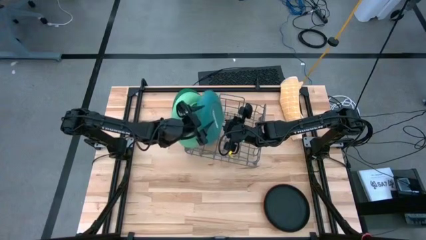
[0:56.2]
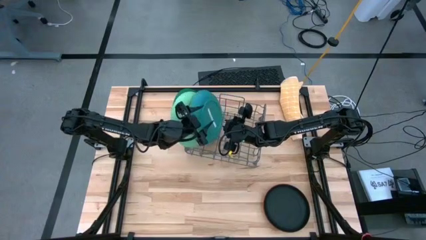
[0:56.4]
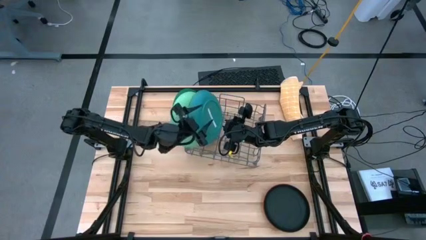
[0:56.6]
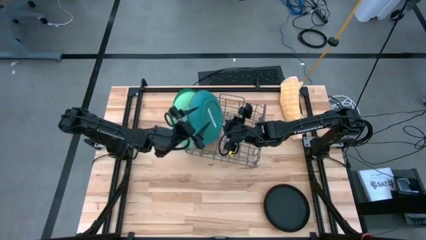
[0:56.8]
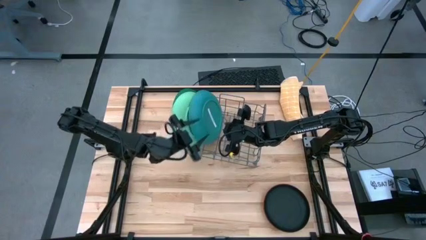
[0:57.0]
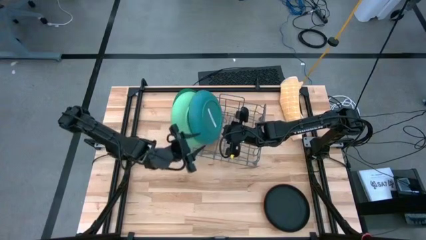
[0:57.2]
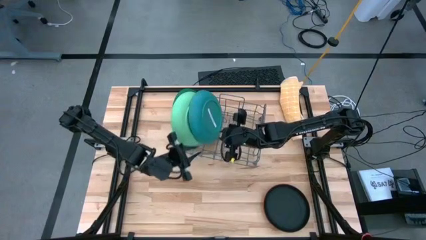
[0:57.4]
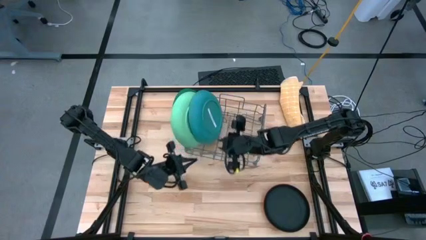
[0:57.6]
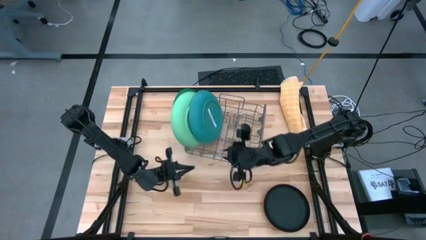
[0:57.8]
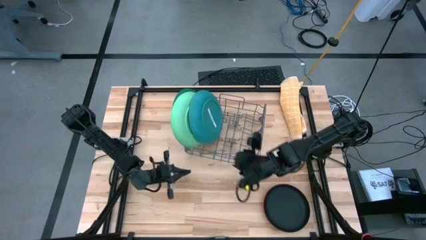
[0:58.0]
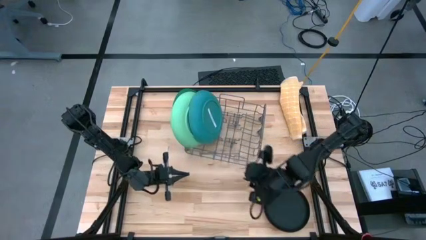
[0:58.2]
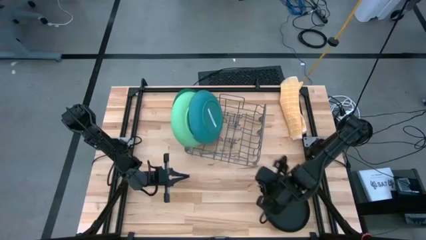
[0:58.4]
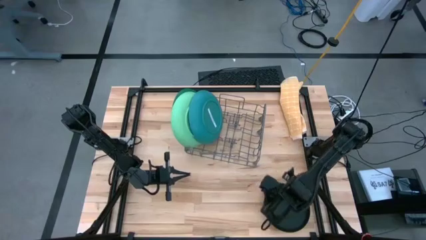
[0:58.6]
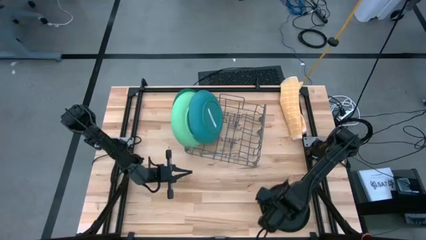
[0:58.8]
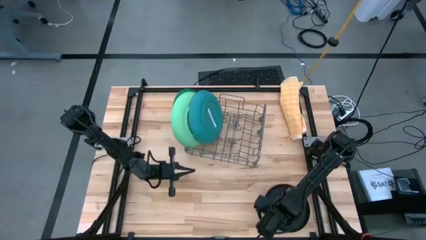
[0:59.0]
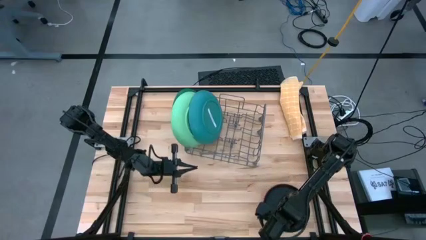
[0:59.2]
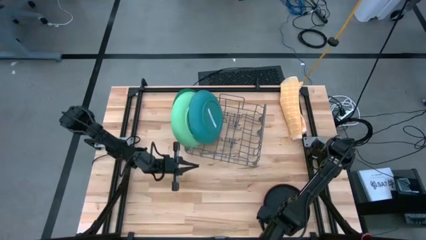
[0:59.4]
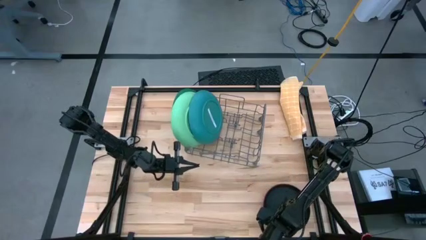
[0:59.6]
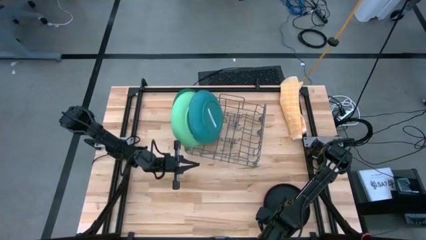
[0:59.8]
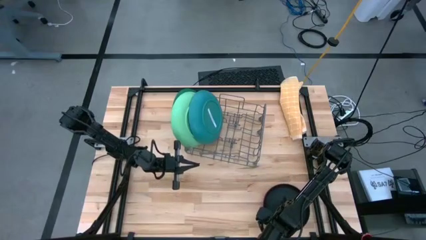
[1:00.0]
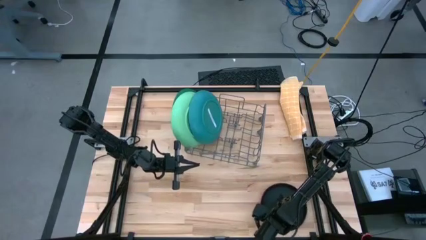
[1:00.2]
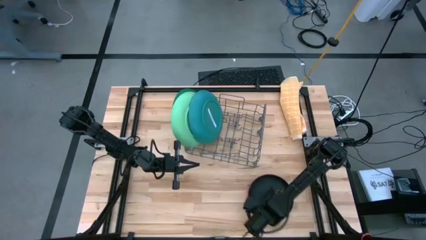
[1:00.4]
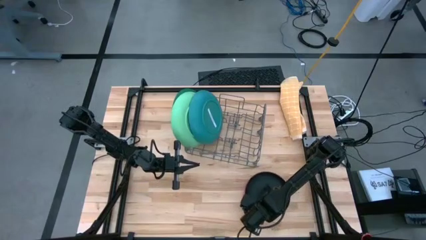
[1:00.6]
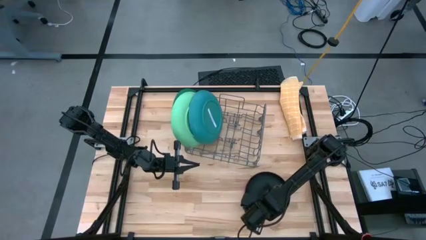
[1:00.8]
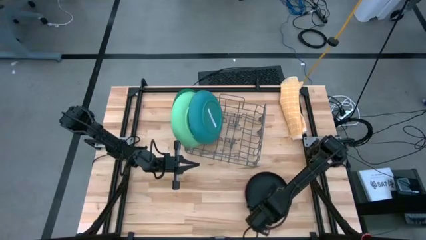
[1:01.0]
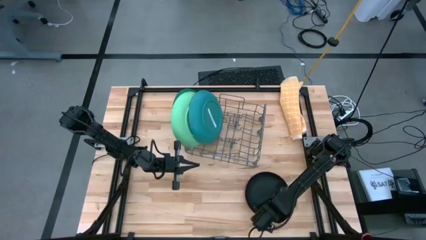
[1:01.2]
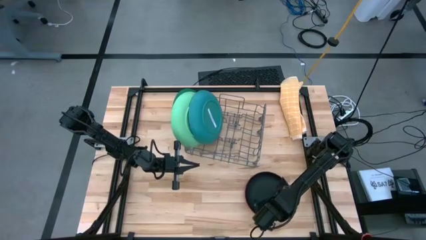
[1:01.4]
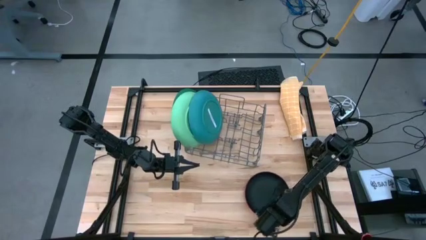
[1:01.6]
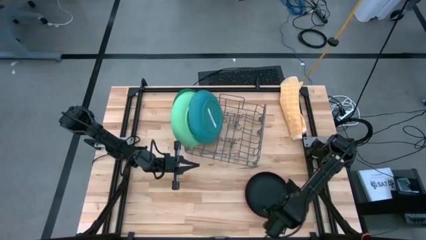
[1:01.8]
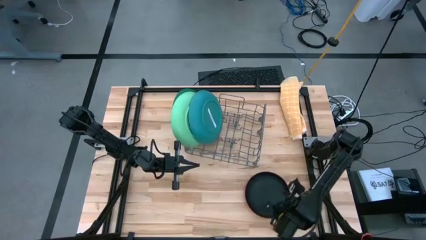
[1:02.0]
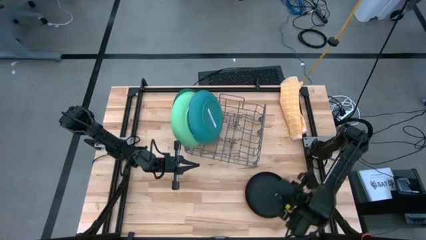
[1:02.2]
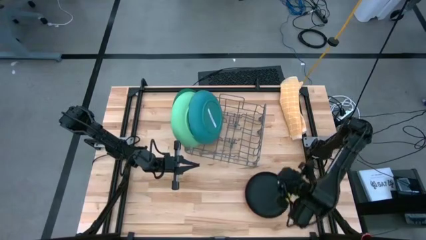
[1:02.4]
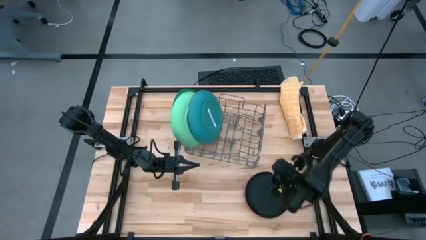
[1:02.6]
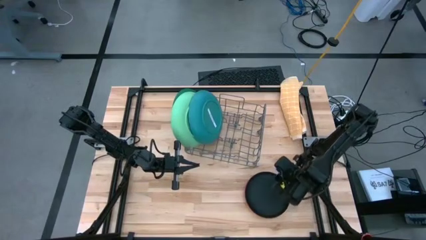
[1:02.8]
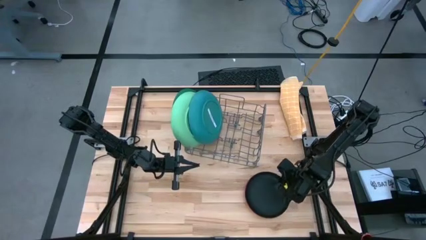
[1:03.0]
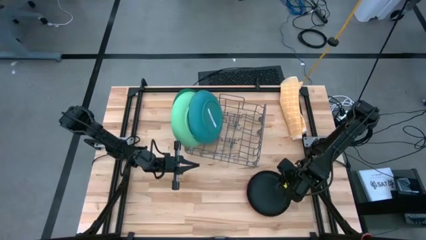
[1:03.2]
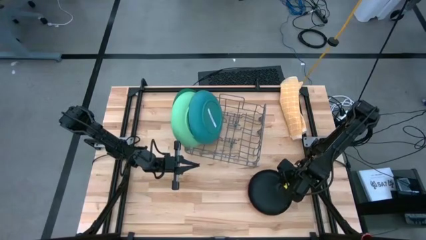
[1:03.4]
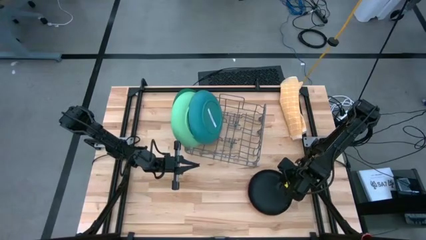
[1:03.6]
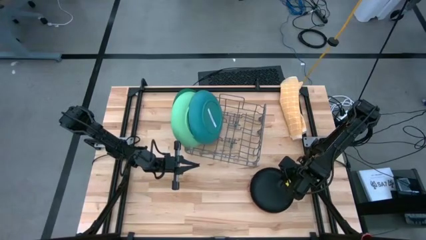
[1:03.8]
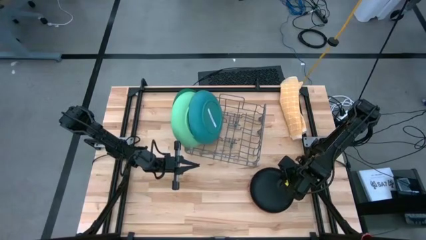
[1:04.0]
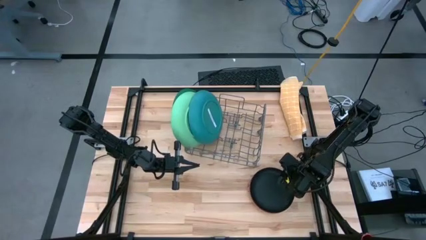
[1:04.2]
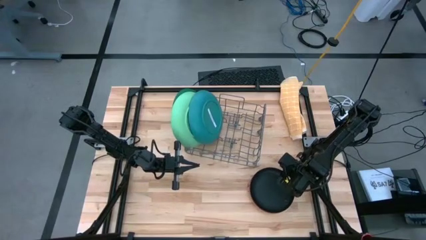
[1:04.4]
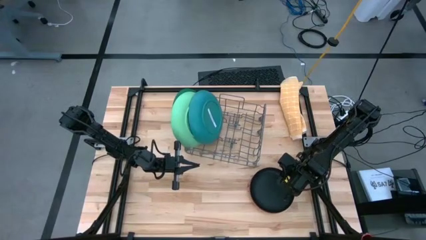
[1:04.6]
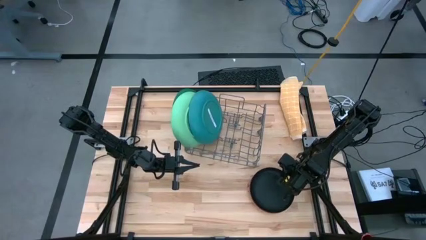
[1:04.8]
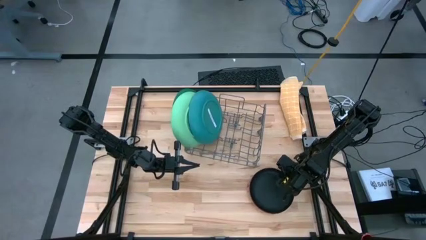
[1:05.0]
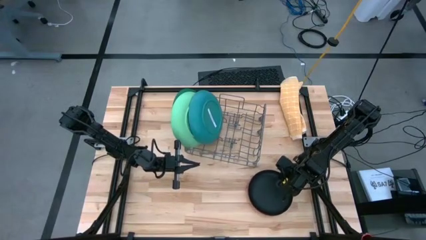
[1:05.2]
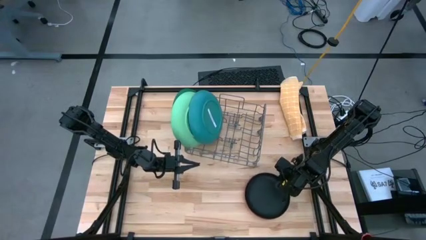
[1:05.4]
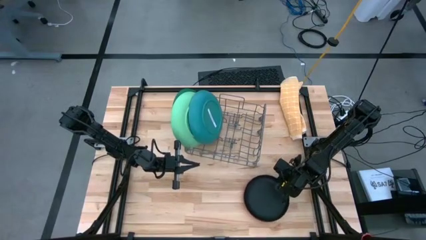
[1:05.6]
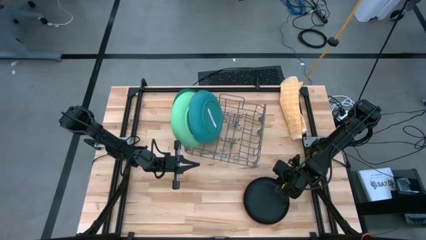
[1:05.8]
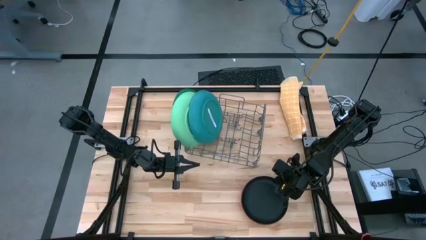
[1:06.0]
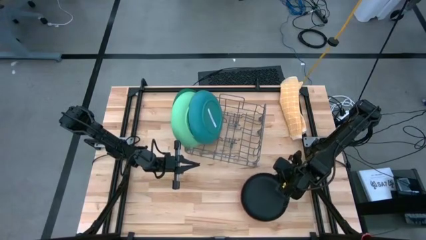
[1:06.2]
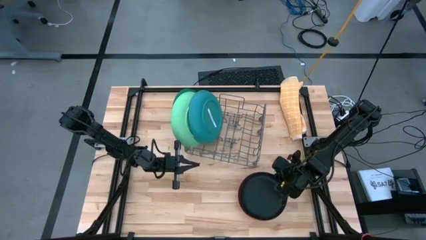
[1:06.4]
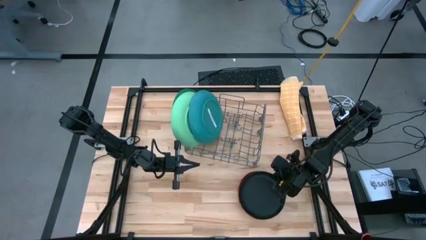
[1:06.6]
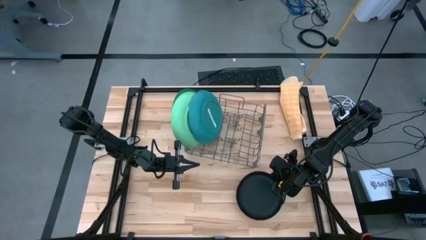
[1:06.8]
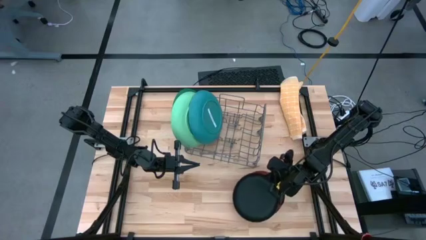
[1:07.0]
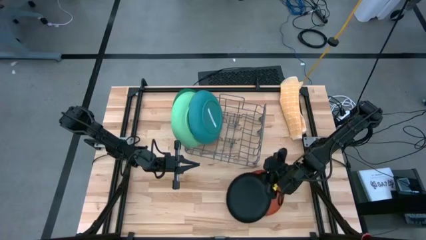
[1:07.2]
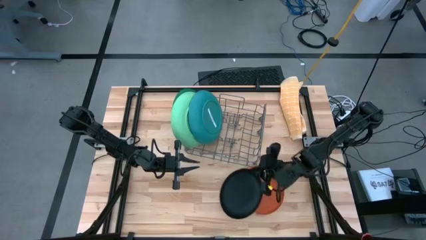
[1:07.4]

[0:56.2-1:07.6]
Task: Sort dishes
Put the black plate into the dish rack
